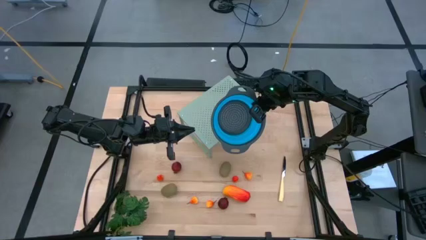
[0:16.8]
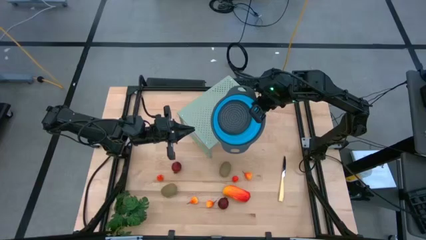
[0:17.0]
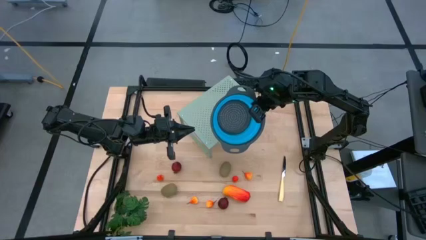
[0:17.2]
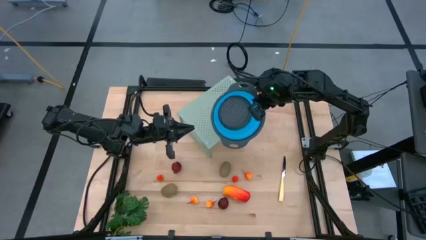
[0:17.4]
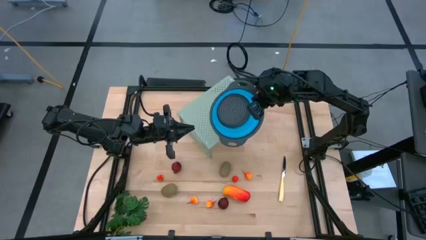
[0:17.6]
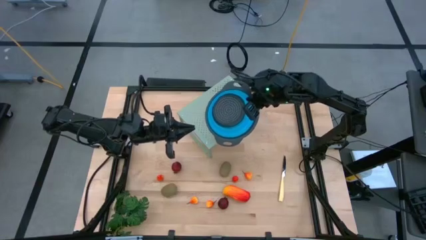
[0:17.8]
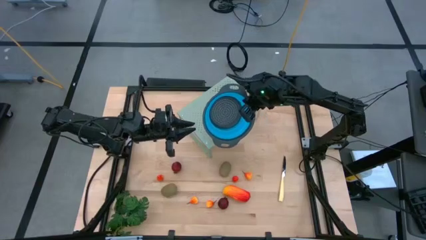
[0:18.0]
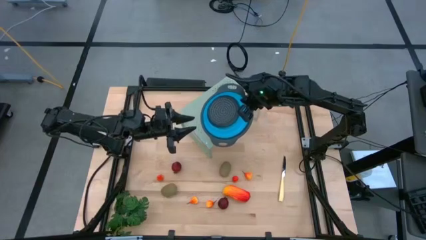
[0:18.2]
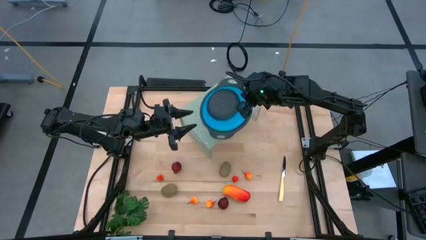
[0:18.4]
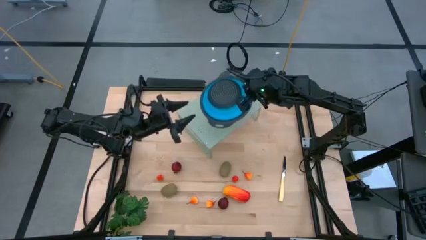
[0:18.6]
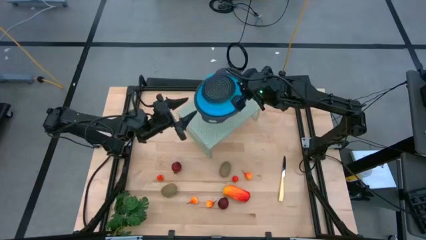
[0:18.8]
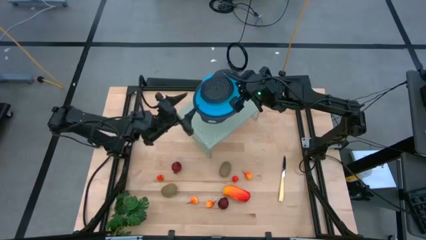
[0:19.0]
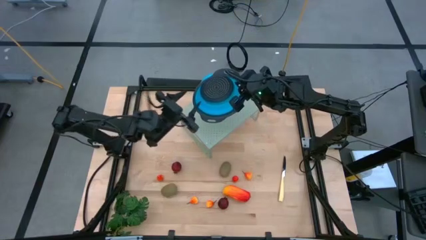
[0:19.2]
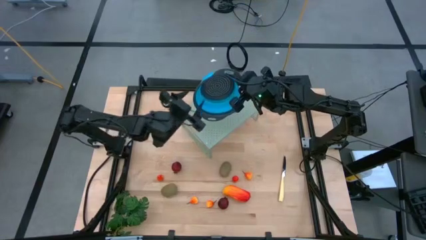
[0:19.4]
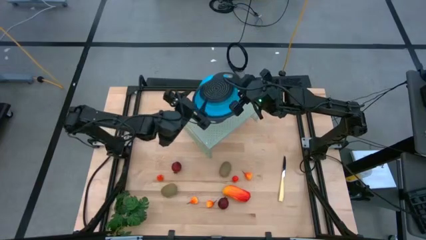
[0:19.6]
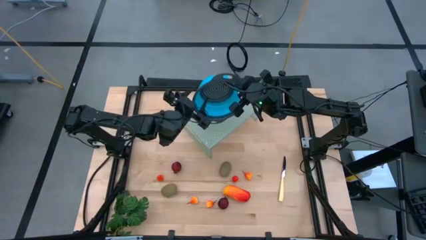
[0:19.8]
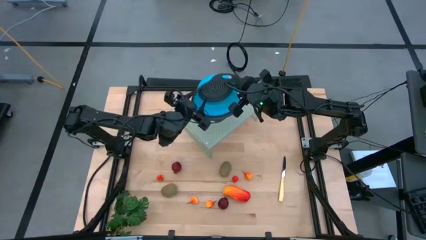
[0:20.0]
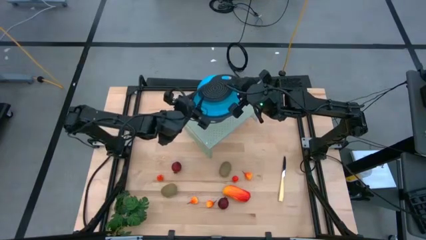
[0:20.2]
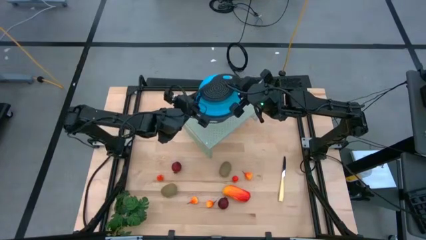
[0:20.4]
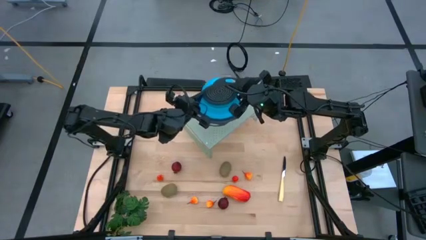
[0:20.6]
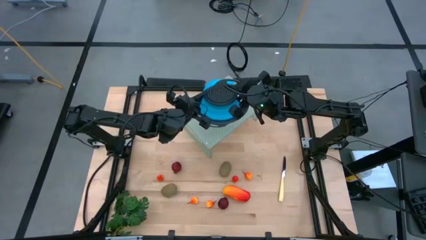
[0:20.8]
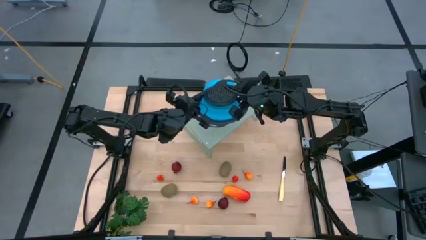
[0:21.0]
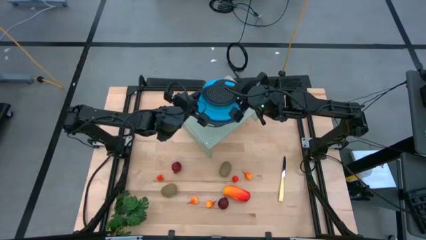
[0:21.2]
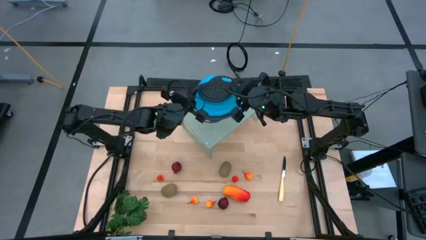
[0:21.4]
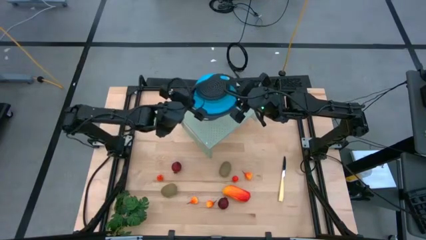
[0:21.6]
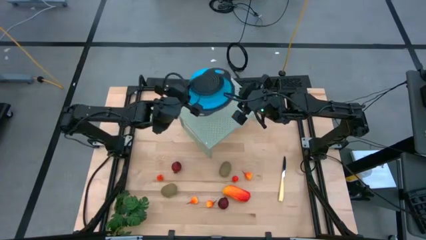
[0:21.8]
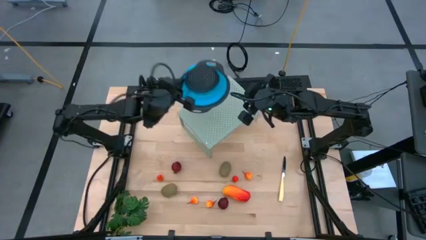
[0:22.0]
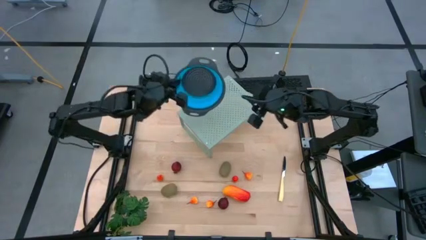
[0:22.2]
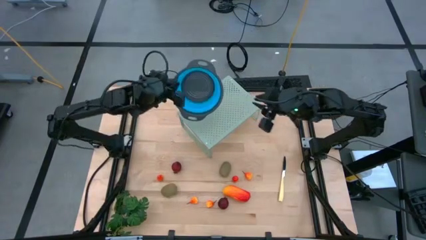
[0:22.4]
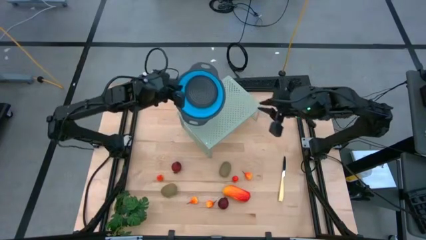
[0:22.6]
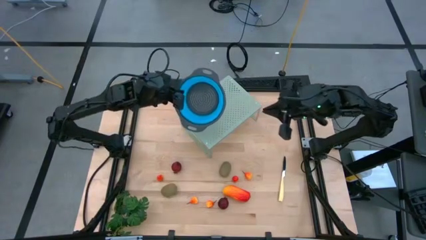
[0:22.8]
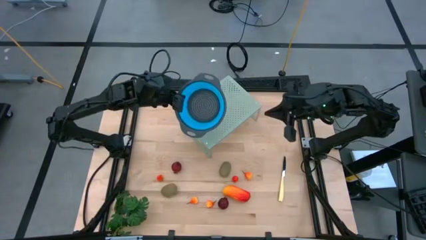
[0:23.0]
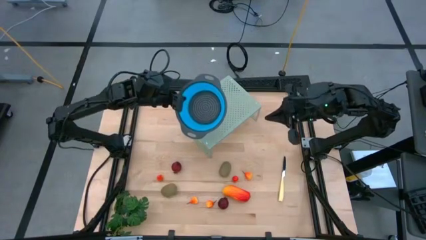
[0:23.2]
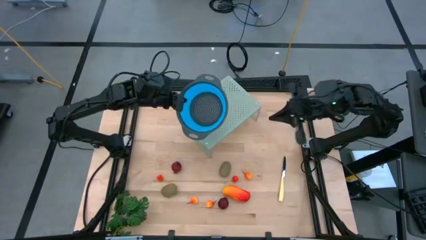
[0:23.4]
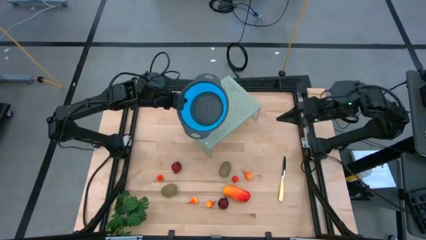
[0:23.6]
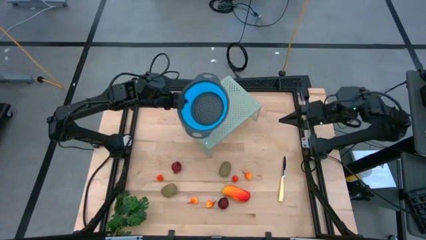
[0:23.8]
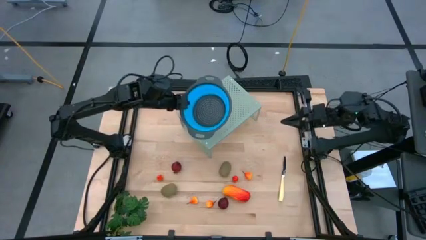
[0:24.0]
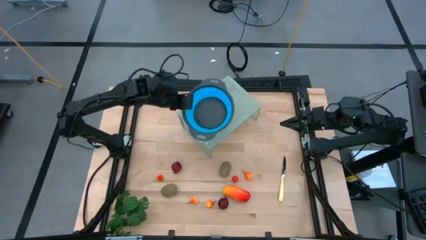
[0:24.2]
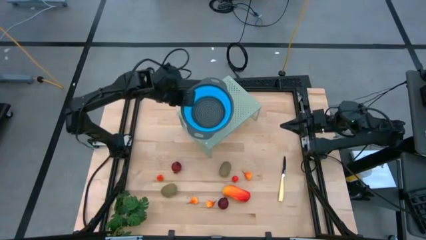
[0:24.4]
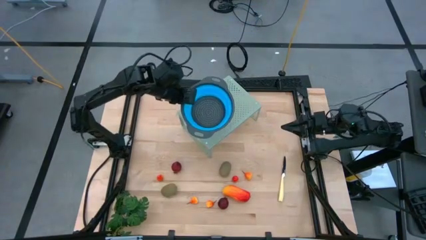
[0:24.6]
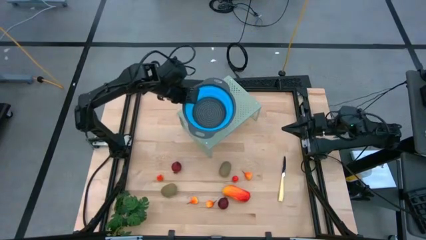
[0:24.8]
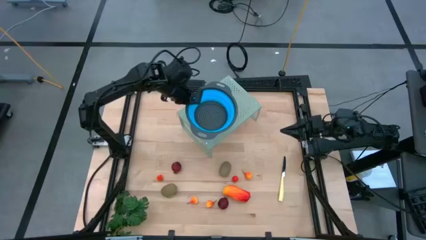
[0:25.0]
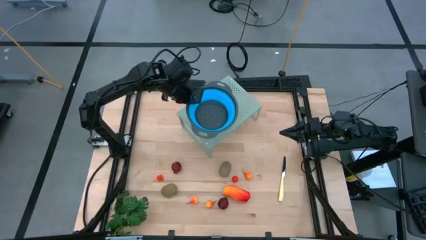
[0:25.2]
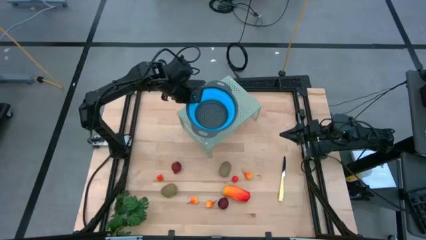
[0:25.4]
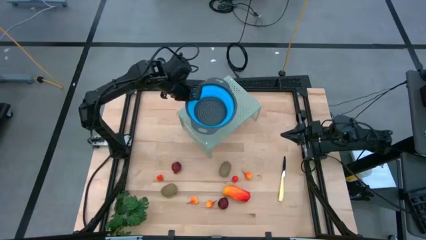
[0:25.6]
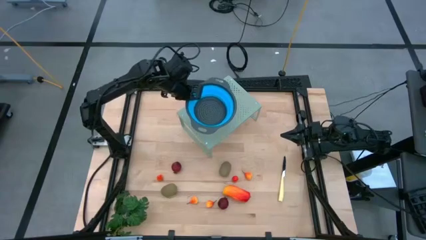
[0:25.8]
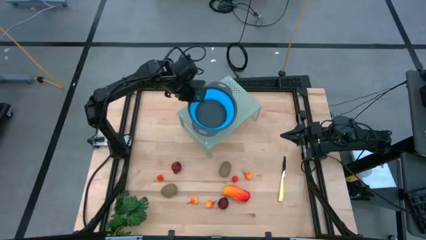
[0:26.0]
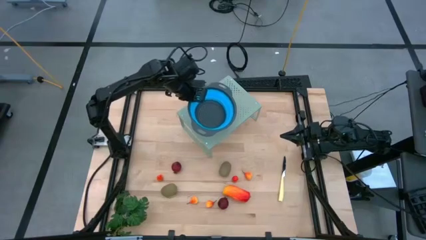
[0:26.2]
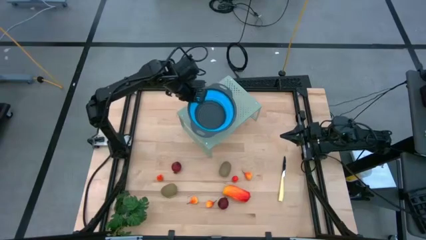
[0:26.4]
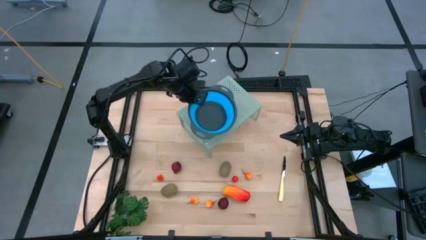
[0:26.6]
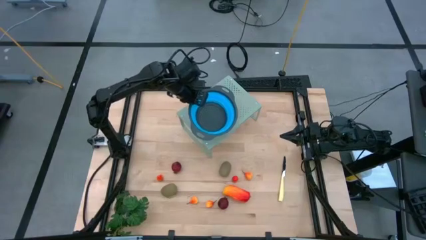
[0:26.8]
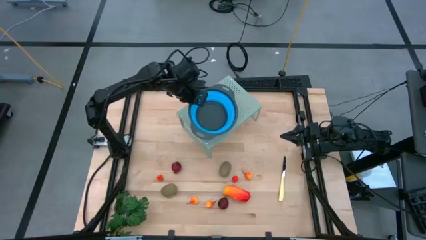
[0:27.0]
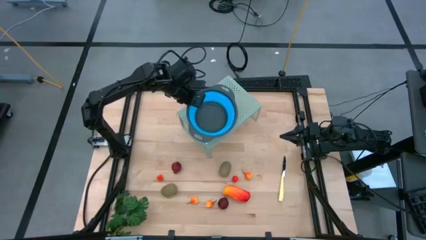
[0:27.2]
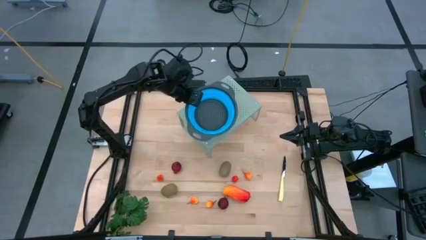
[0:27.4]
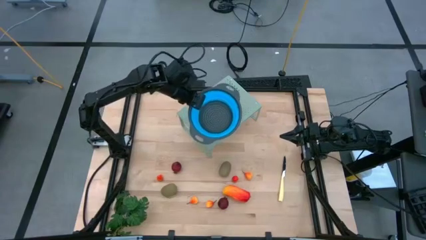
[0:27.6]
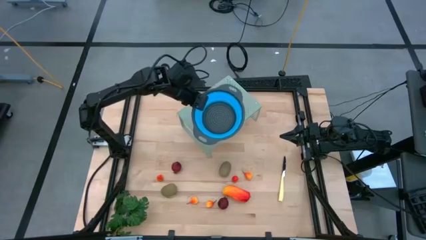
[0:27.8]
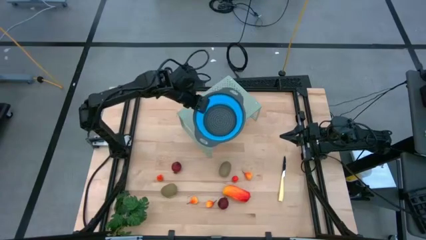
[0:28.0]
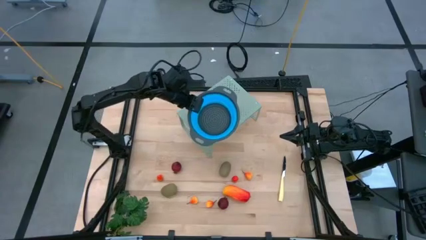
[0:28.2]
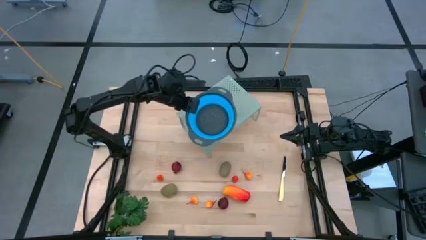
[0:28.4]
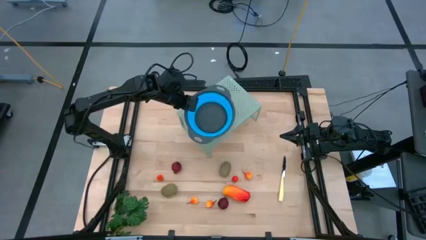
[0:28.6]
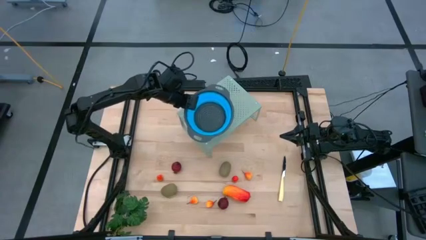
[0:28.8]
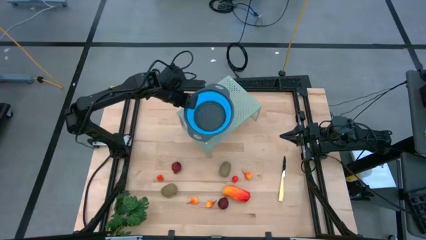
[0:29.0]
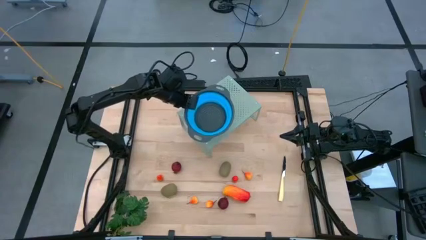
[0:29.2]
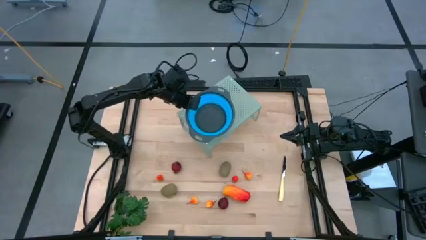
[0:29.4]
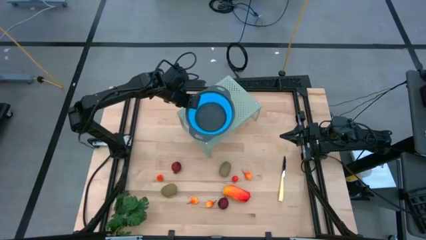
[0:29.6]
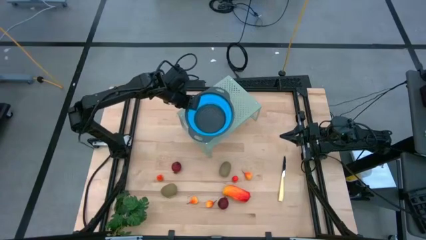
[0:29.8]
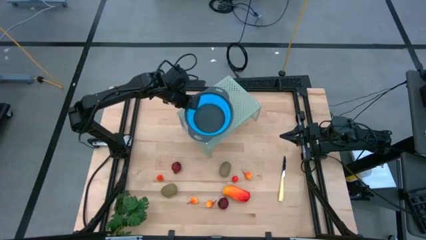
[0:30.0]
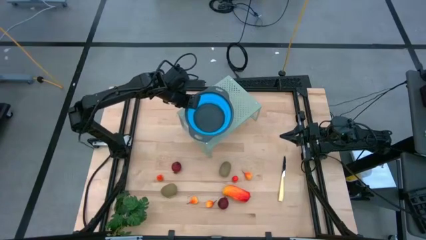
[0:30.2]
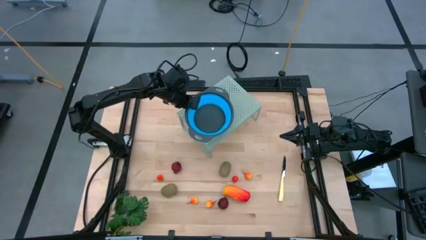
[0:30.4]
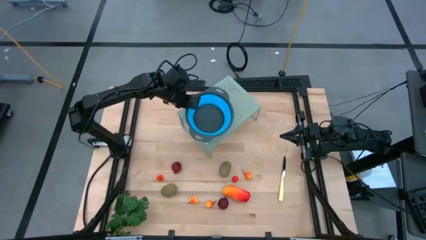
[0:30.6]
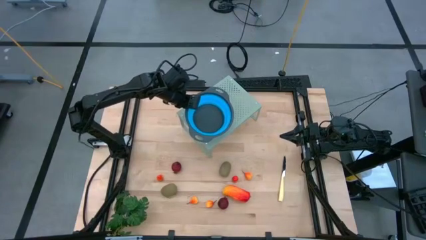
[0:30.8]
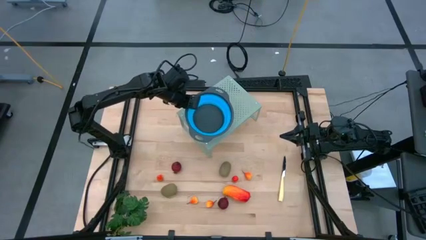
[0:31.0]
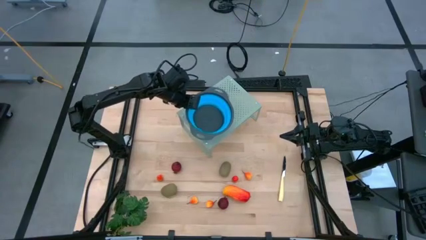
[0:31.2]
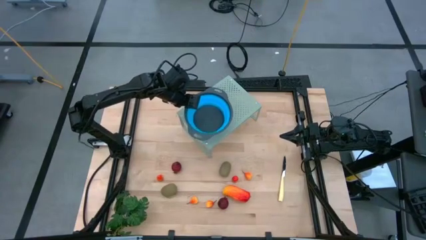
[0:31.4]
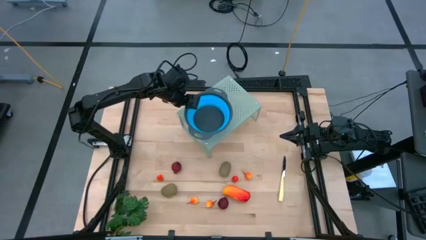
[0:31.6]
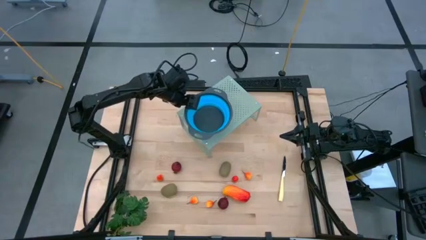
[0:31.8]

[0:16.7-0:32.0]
Task: Pick & Place Fruit
Put the blue strainer bowl on the shelf
